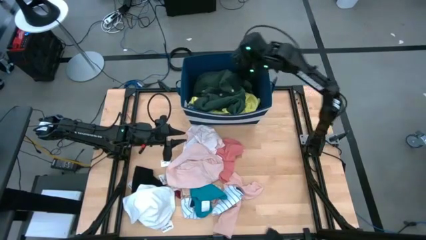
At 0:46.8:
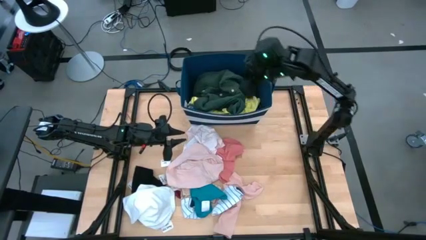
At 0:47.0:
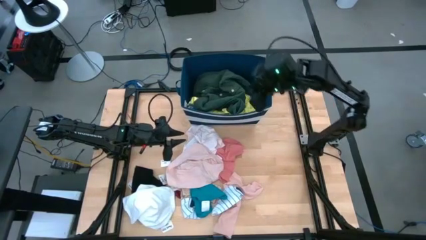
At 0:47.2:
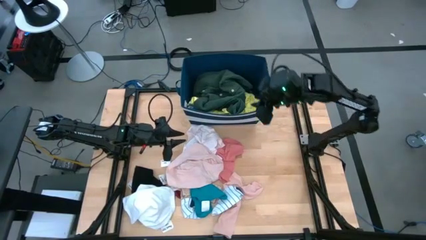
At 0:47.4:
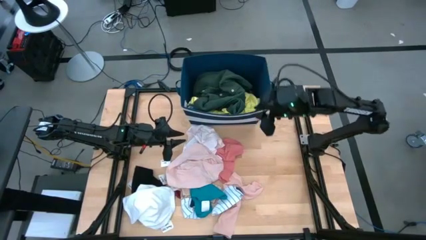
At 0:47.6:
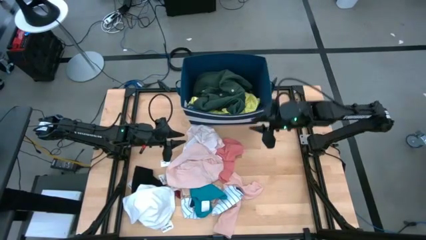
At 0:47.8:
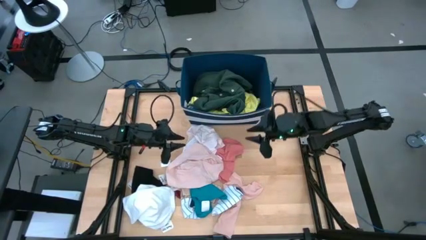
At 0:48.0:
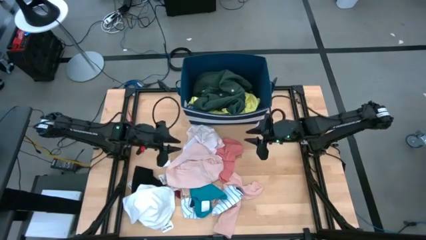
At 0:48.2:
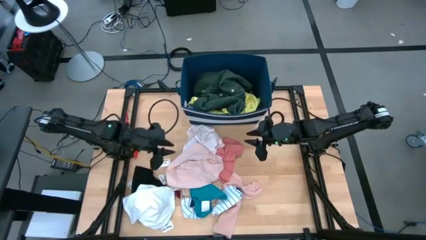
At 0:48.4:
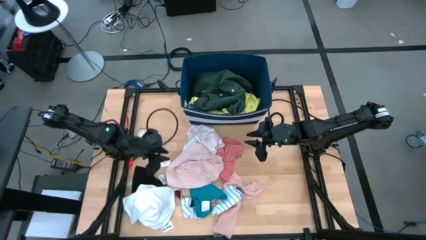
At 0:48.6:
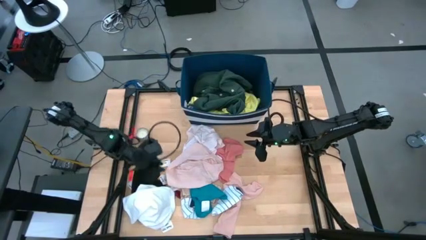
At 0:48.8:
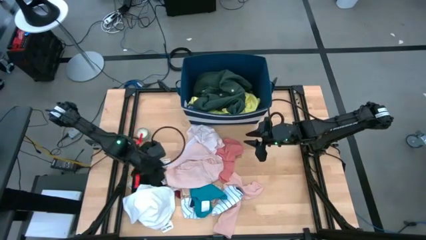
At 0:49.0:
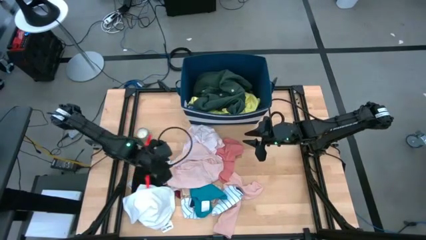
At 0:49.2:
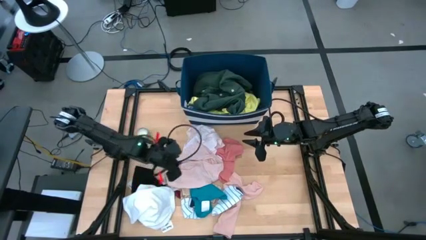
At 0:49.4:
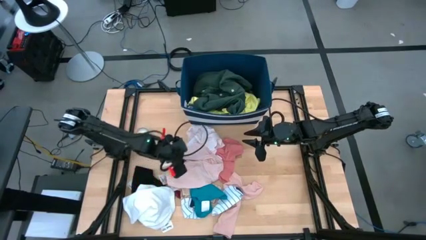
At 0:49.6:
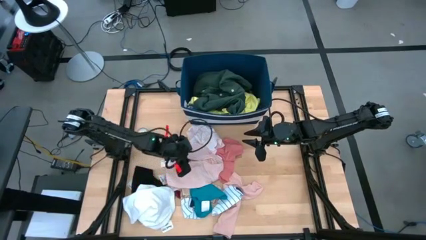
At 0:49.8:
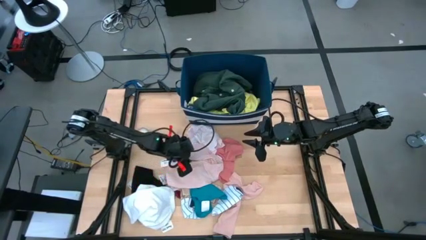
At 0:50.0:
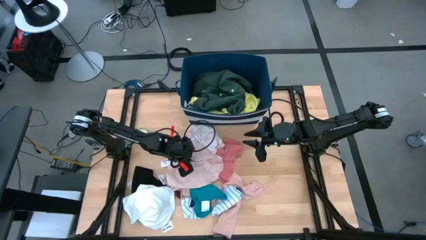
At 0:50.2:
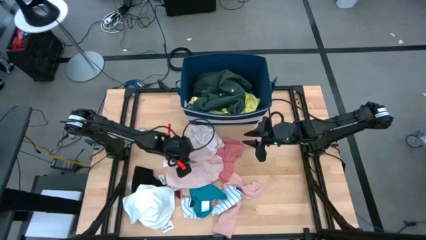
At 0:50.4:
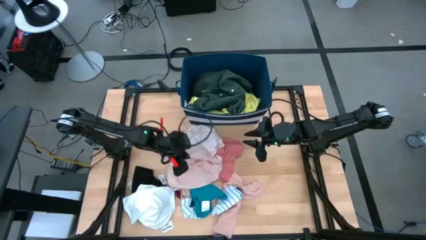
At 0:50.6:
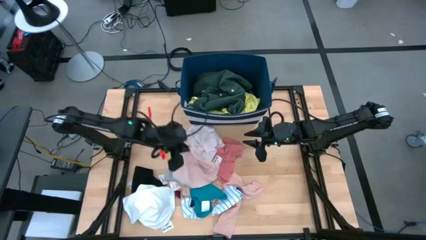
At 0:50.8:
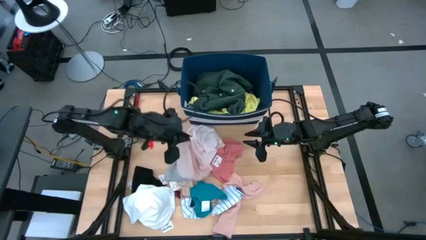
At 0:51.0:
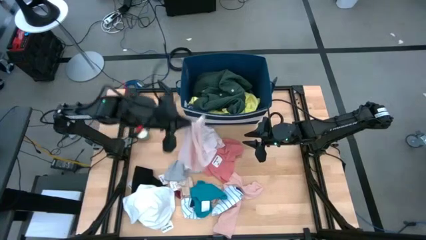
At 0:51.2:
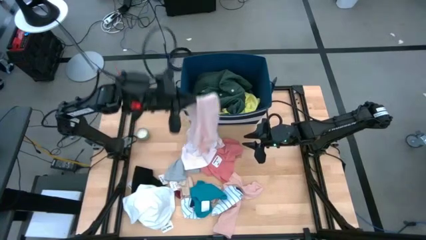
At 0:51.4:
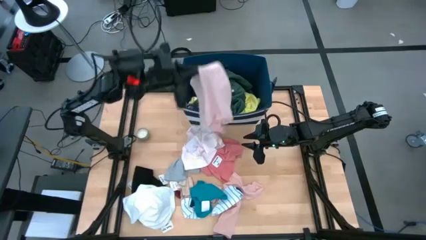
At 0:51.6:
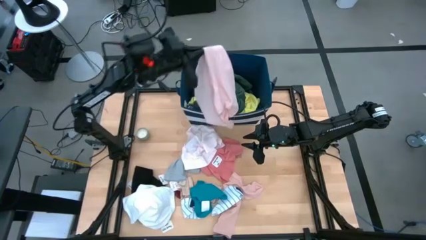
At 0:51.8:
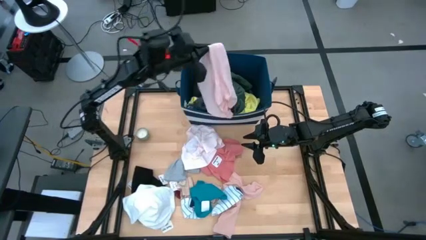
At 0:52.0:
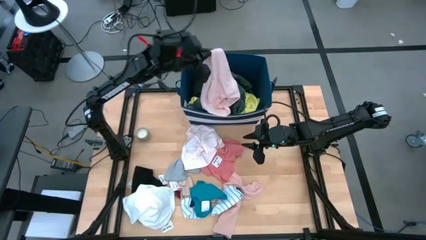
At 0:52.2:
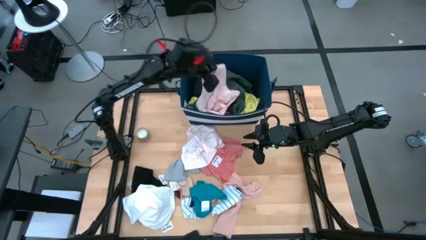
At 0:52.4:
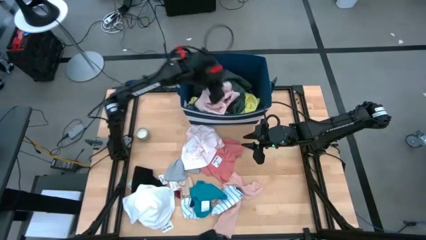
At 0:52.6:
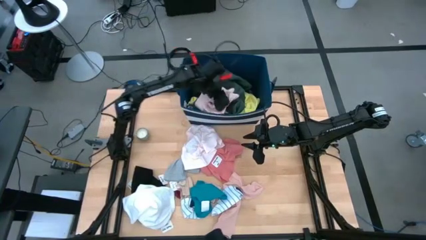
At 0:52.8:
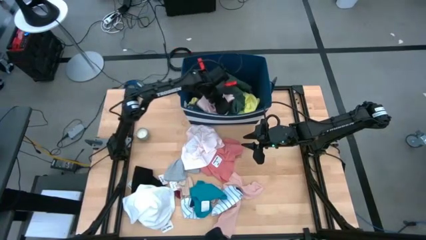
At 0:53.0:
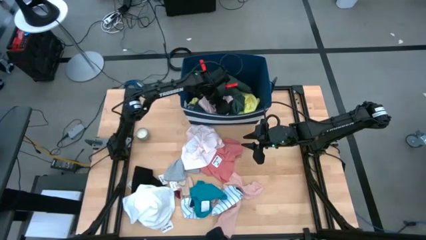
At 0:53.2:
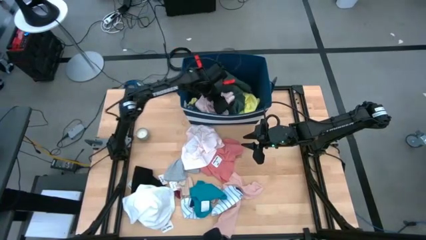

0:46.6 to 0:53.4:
Task: Sort clothes
Put the bottom light pink boxer into the blue laundry bin

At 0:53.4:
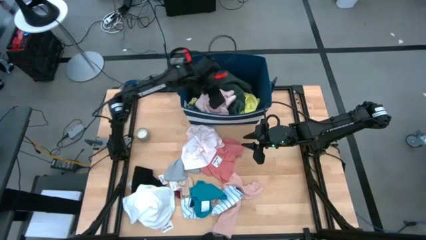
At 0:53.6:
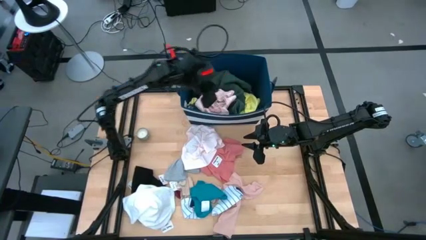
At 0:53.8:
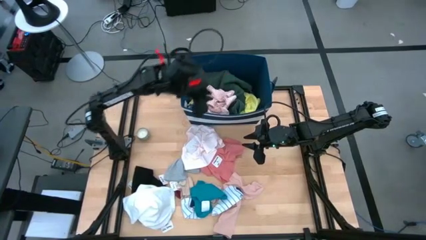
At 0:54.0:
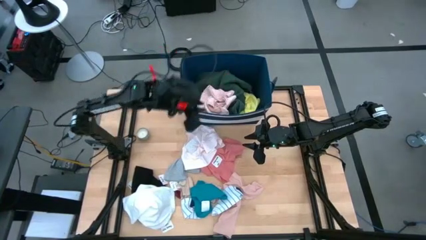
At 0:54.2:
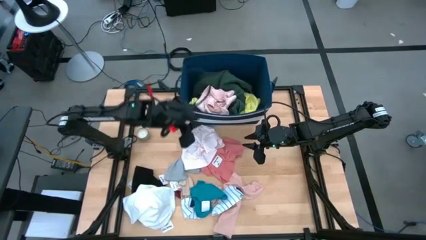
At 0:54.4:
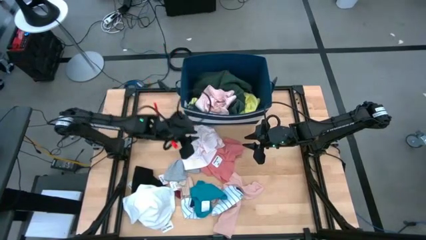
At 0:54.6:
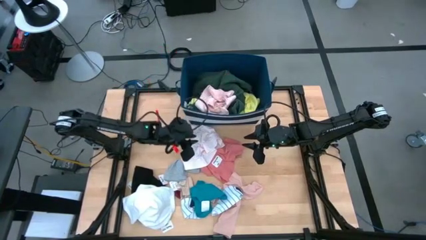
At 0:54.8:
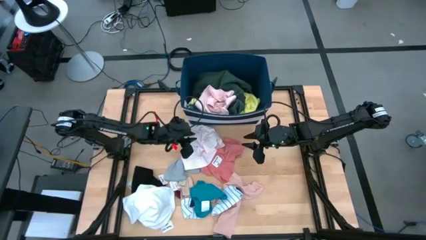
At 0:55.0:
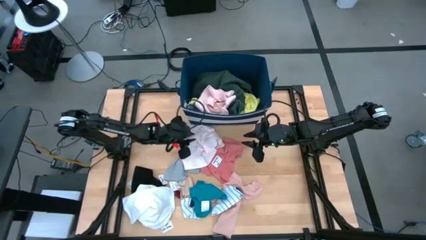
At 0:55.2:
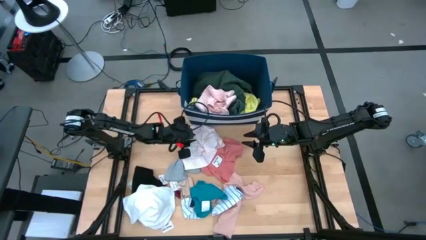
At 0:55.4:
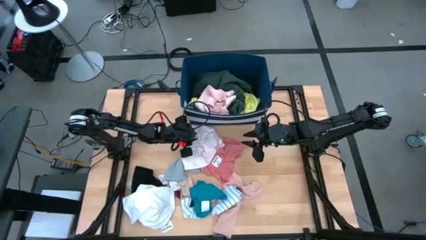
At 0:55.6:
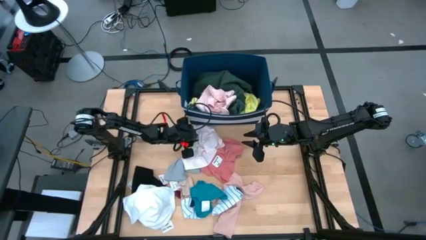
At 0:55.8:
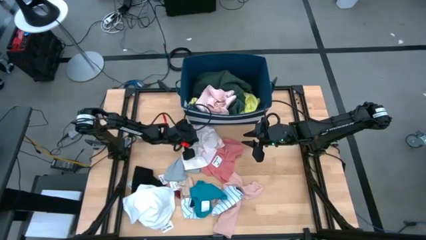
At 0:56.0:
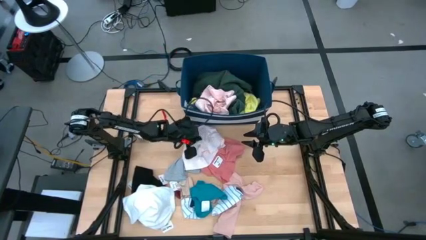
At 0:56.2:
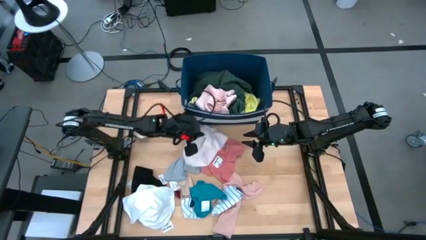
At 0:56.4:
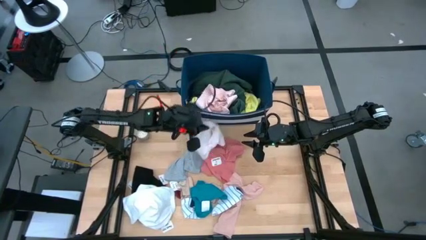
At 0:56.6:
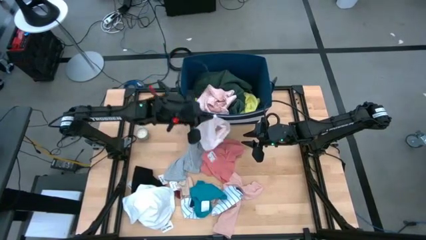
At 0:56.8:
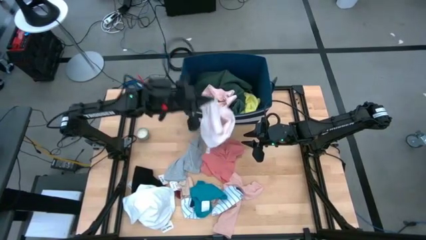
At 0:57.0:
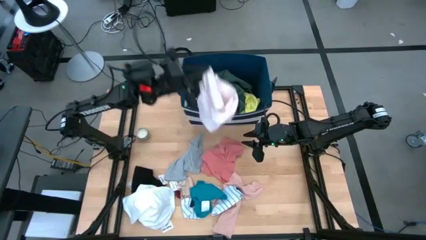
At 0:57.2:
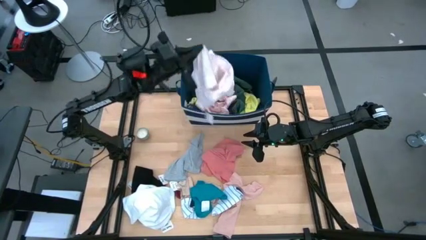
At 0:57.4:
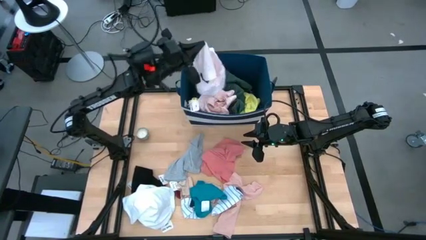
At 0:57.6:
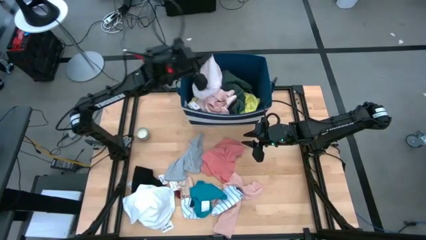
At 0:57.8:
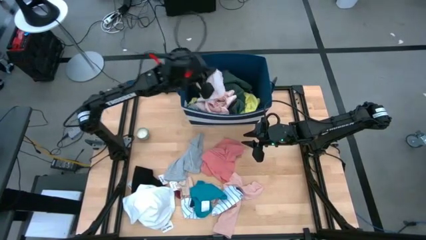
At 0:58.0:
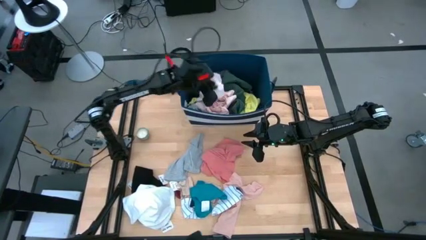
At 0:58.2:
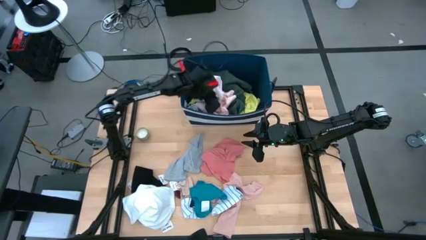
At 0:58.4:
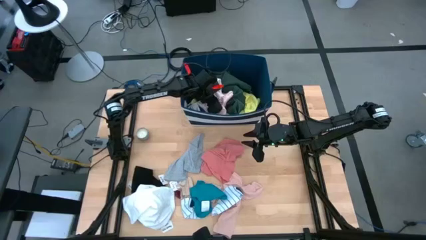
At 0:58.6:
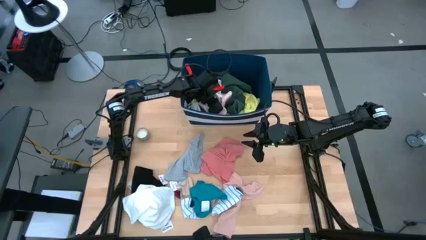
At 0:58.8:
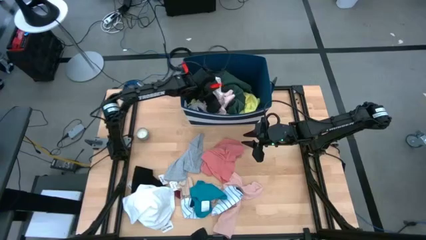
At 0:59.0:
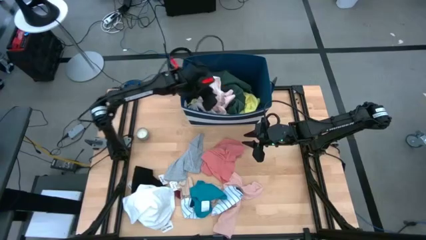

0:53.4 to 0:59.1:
Put the light pink boxer into the blue laundry bin

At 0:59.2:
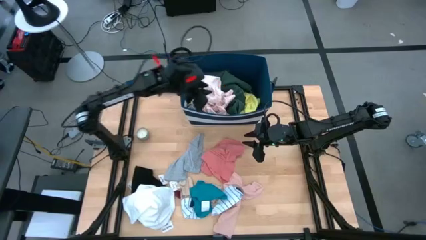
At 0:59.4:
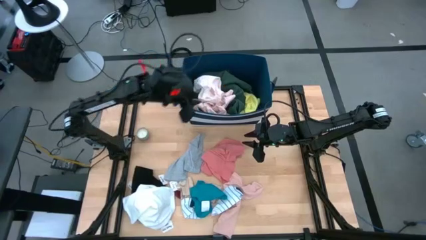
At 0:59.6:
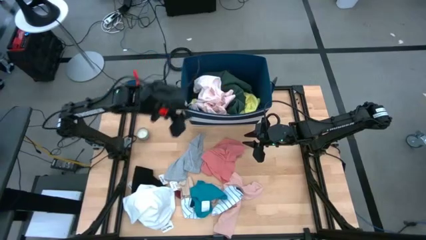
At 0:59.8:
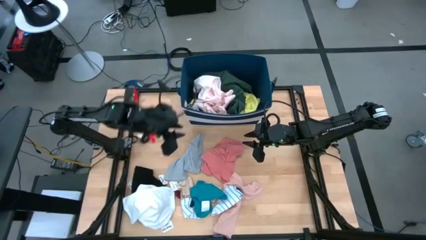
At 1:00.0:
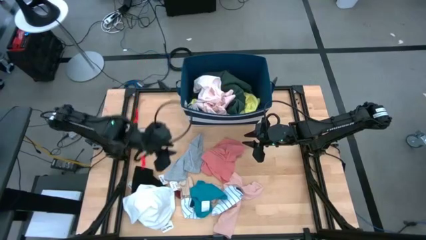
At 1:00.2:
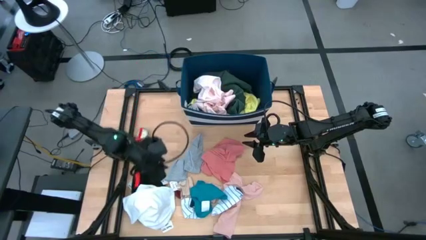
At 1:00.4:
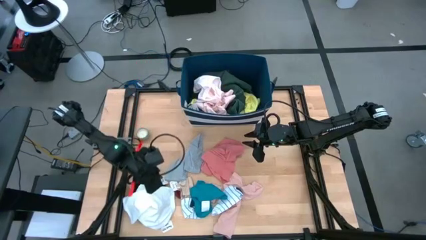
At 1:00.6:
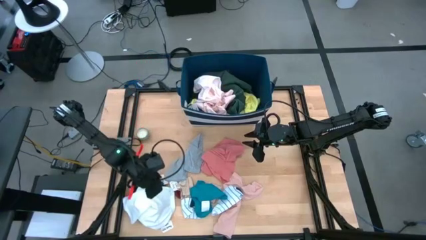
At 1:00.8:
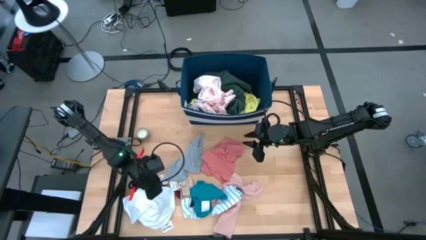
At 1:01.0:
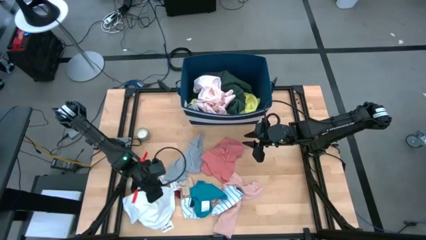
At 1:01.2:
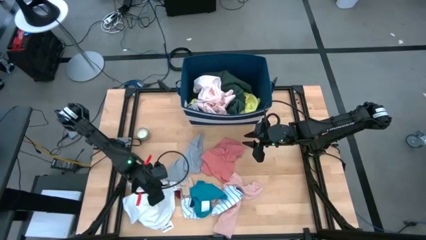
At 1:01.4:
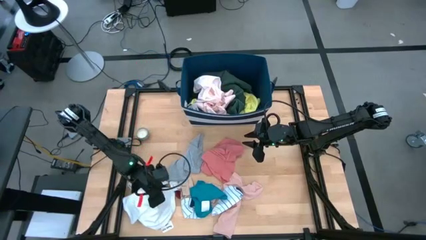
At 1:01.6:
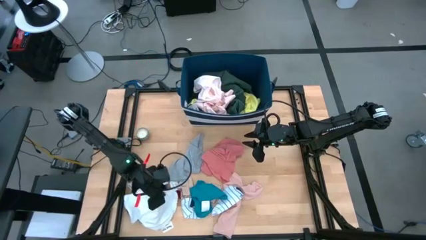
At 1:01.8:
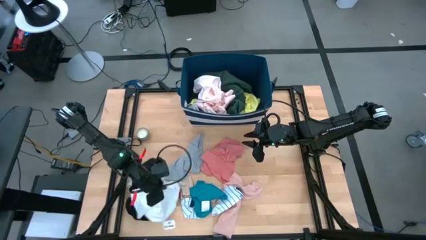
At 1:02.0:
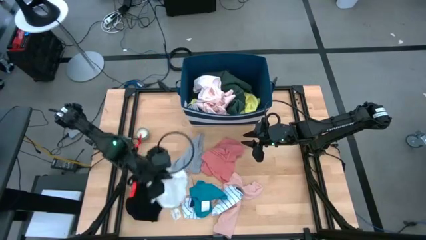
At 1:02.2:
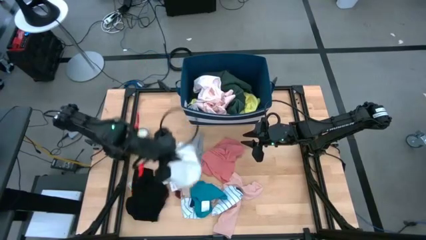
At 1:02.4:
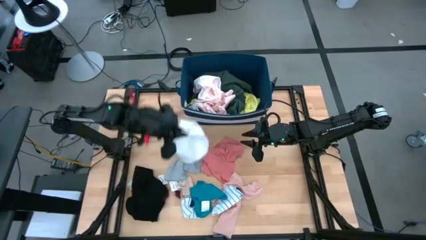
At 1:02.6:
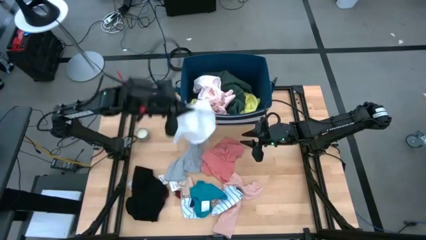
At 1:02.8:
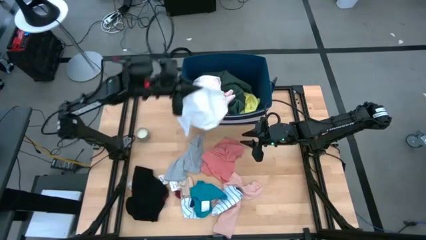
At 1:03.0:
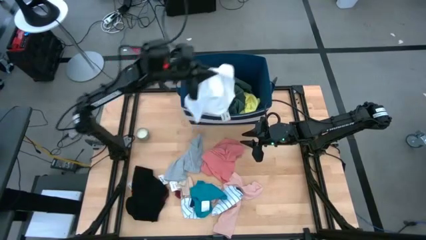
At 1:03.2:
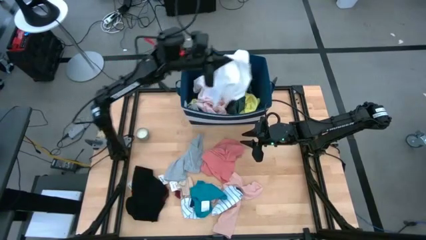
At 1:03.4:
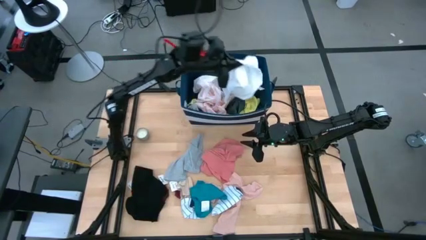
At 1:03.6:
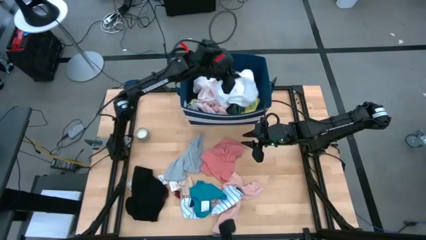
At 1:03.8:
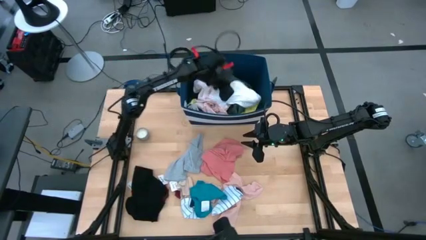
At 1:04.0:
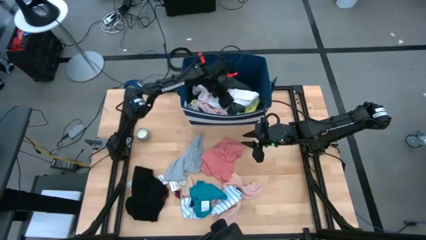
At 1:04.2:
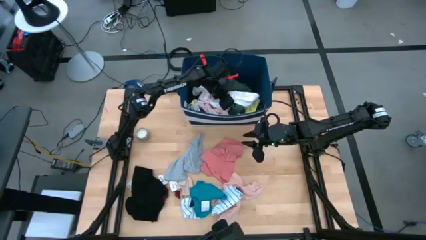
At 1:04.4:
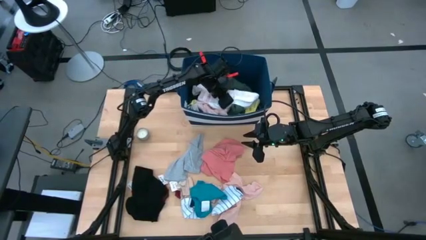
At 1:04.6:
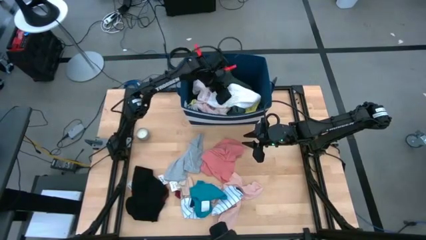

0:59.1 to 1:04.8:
Put the white shorts into the blue laundry bin
